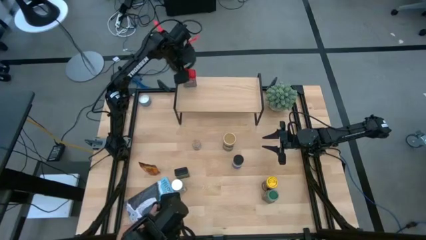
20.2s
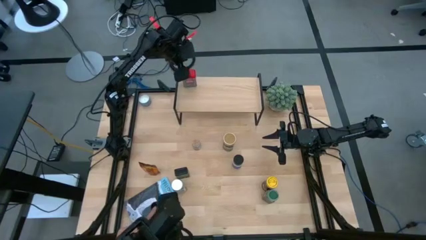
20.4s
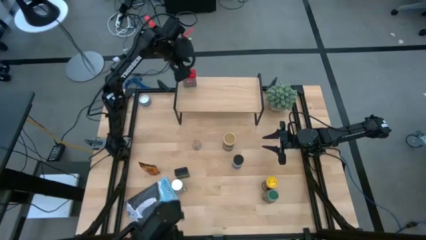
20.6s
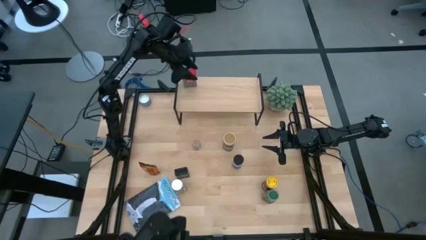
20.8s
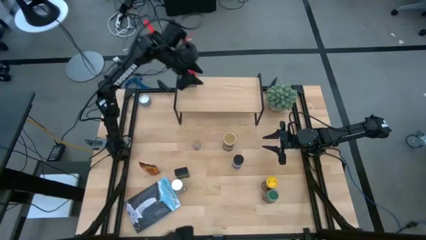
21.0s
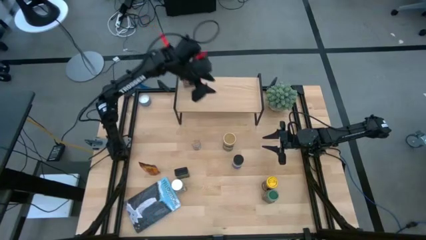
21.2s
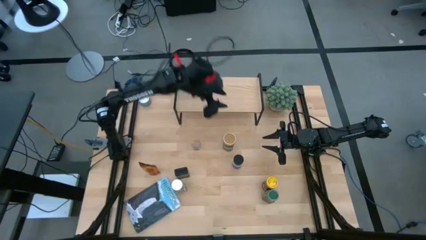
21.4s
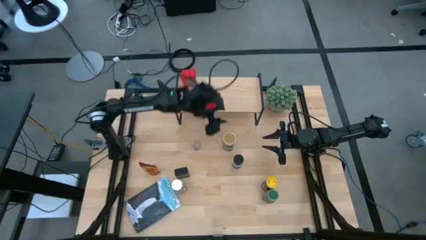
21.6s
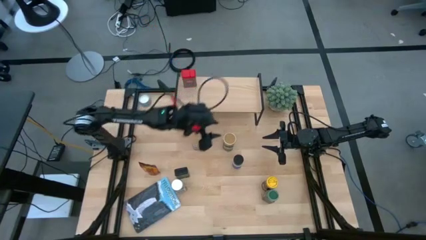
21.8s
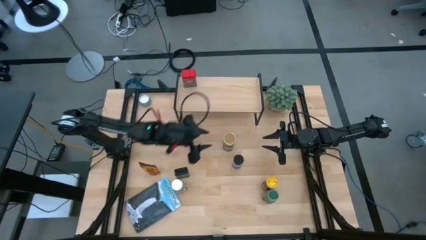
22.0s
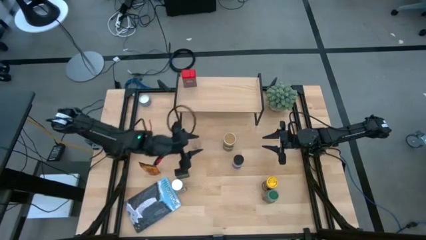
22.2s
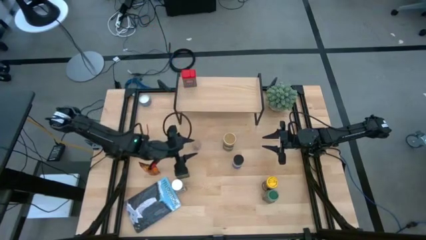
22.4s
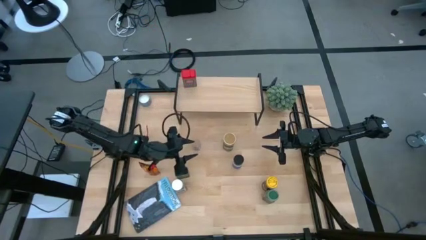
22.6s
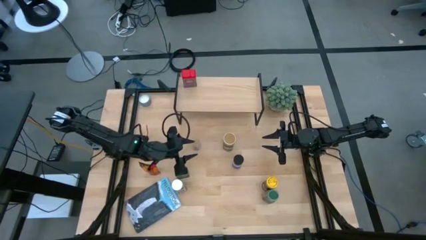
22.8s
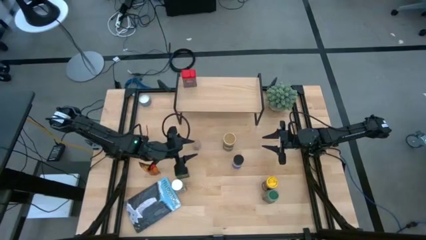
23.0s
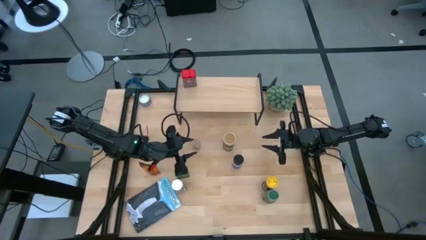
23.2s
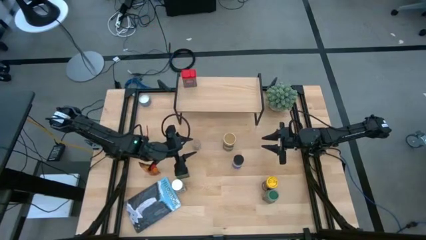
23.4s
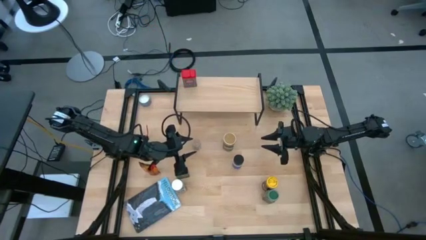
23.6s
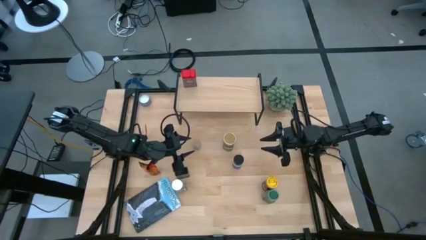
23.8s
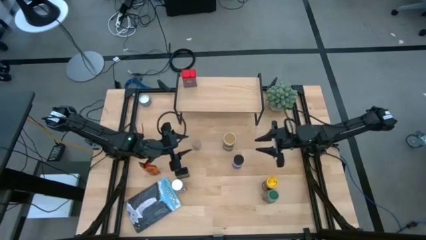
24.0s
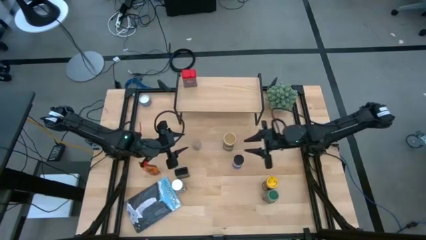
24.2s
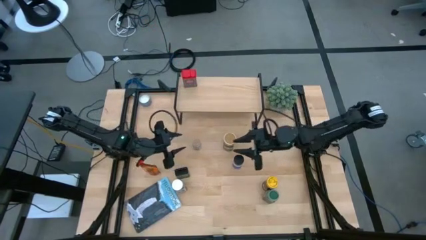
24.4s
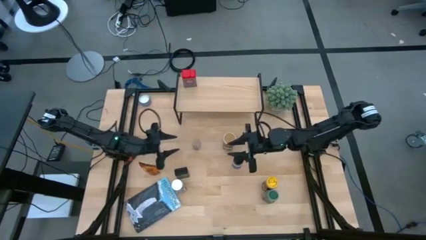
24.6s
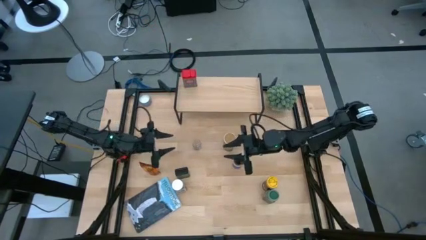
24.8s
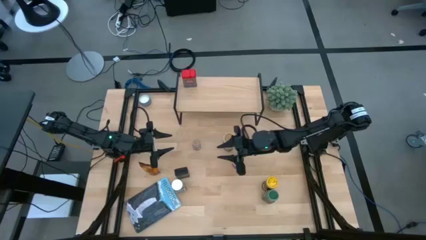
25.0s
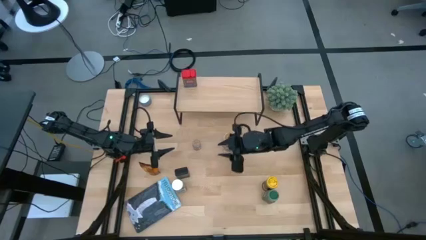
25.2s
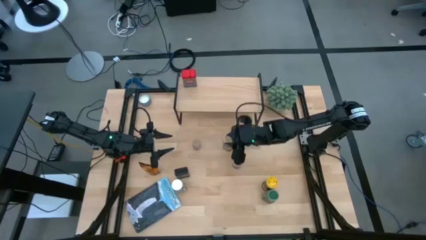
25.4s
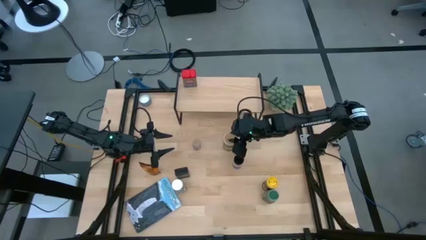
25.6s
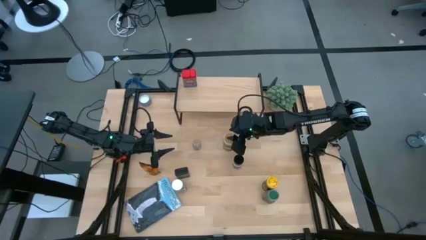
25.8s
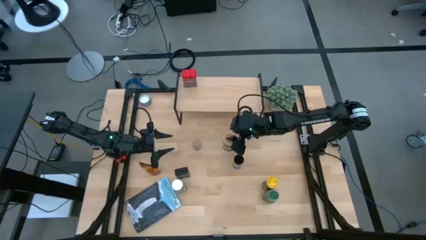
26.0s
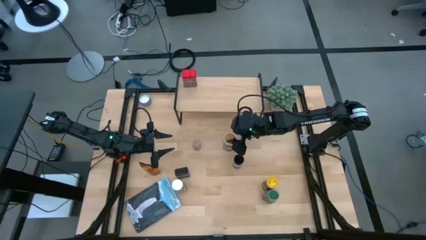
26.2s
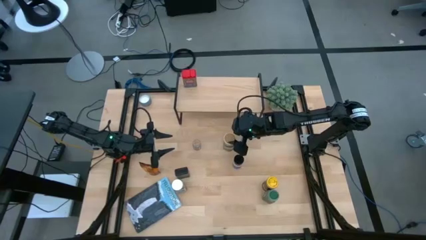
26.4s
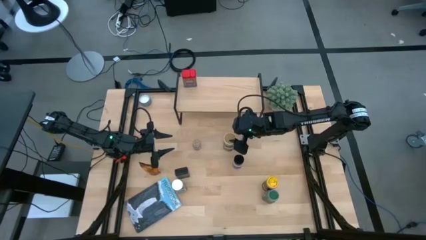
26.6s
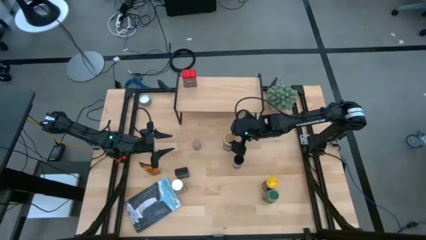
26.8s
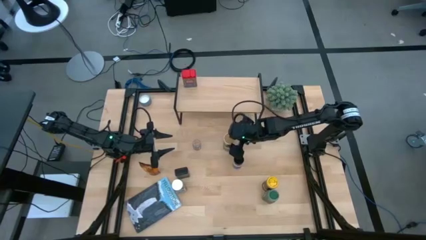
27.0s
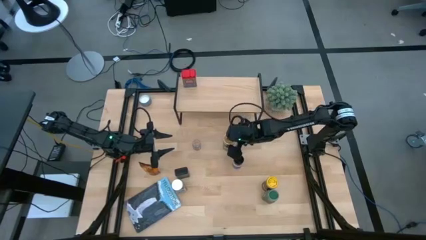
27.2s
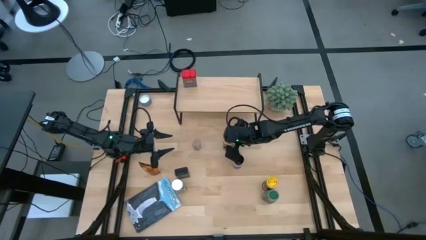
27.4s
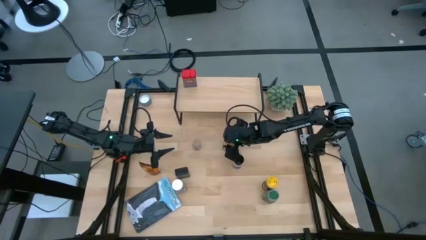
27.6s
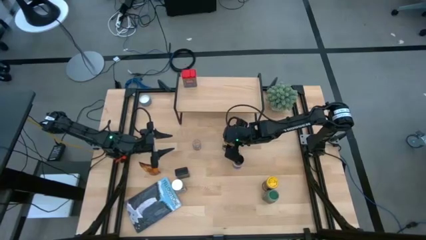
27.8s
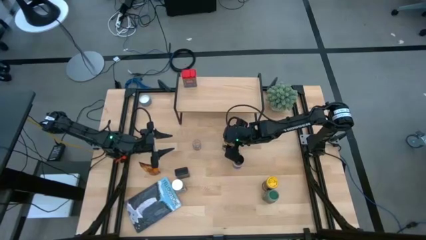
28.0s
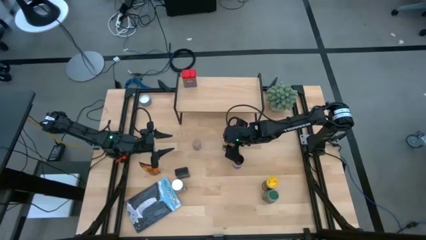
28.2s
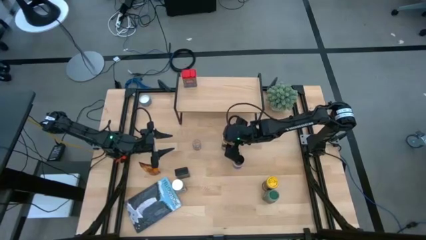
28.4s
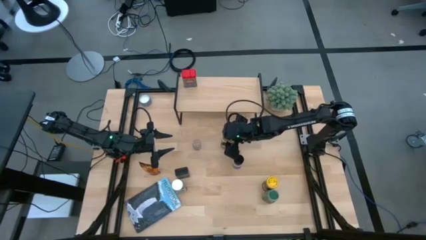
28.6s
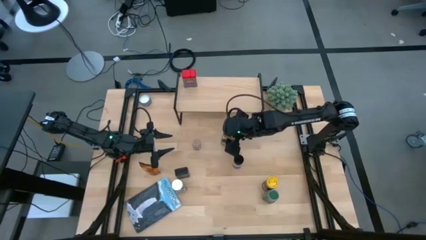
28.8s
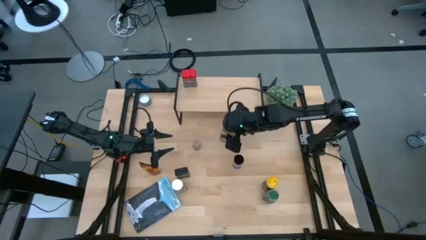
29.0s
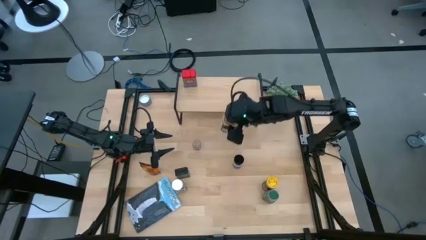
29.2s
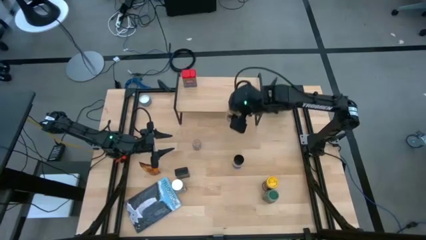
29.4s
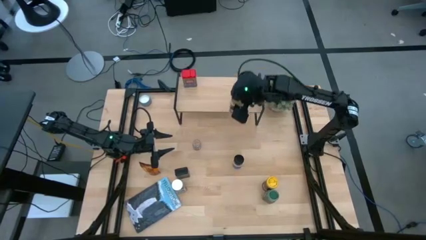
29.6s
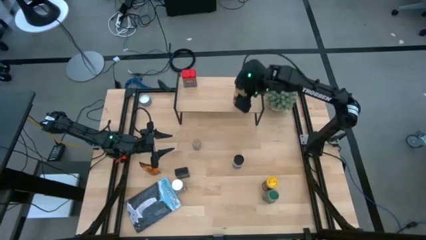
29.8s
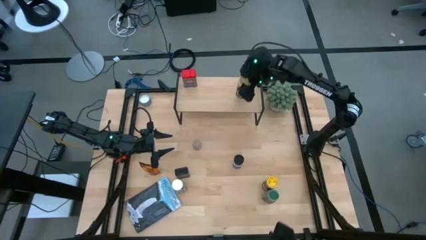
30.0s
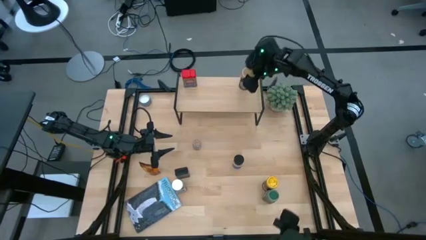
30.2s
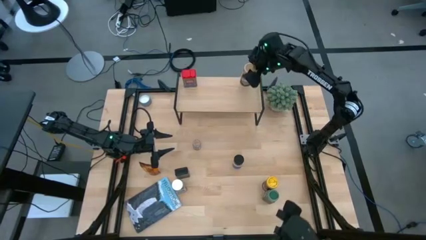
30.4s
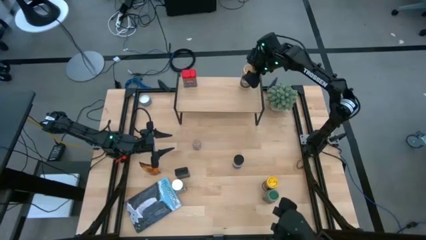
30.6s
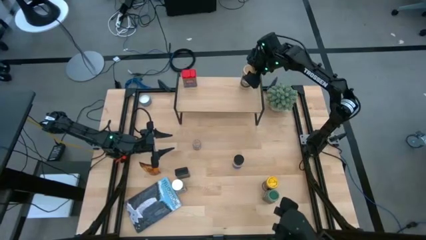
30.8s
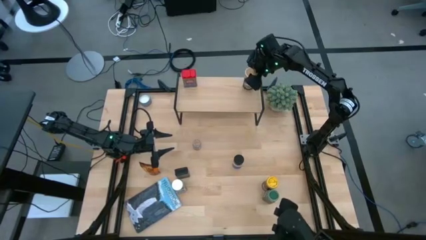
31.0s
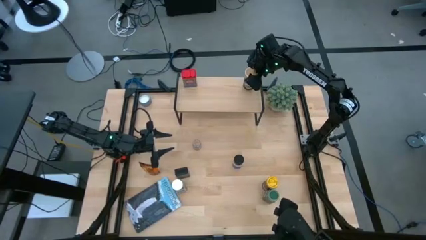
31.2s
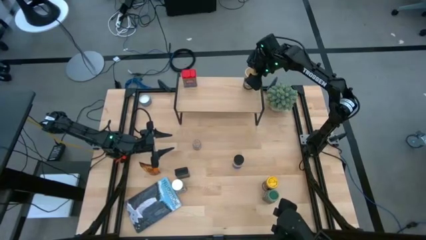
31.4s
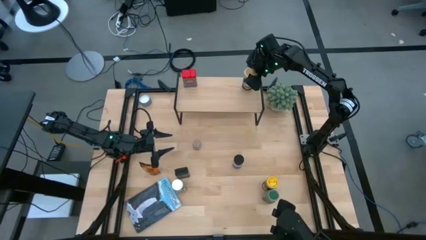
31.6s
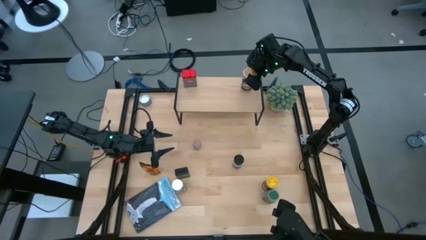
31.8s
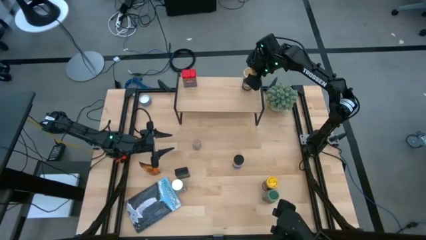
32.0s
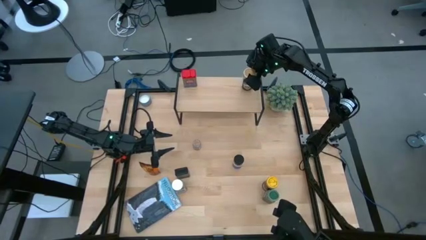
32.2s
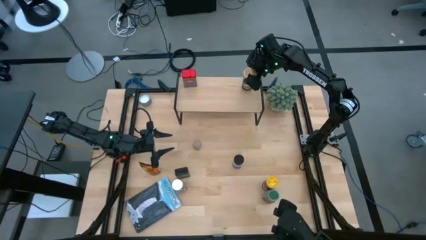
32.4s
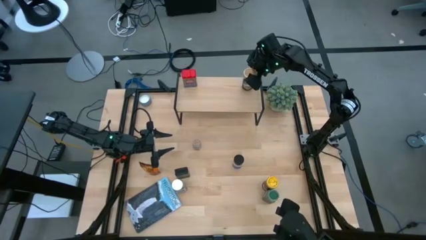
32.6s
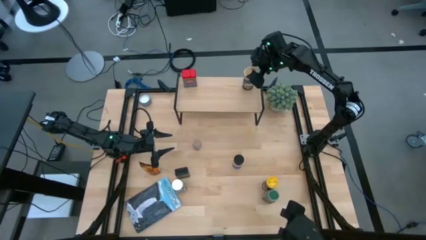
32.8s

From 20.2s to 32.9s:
Task: Shelf spices
Put the gold seasoning bottle on the shelf
